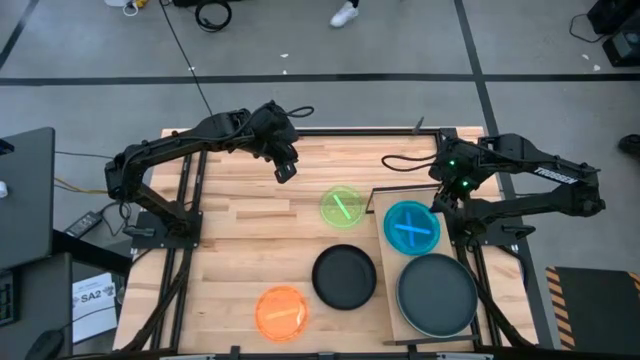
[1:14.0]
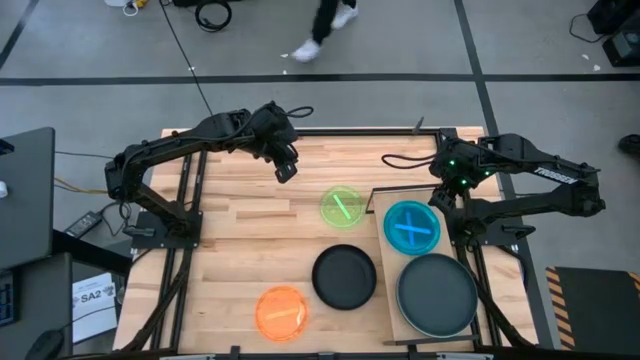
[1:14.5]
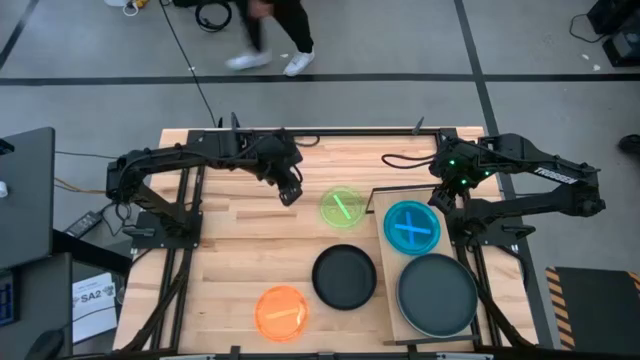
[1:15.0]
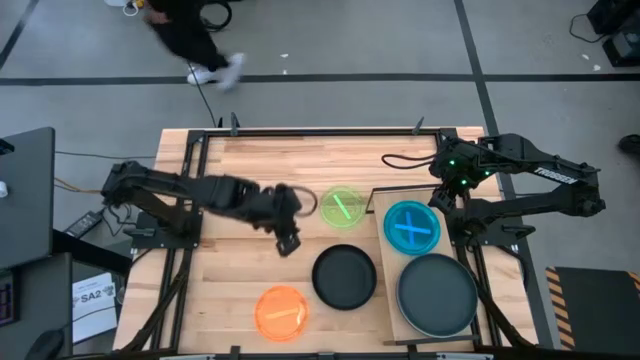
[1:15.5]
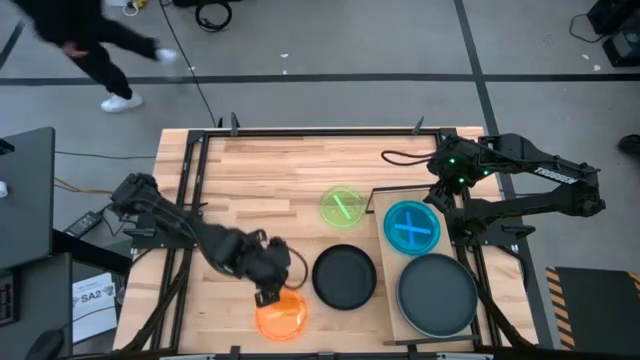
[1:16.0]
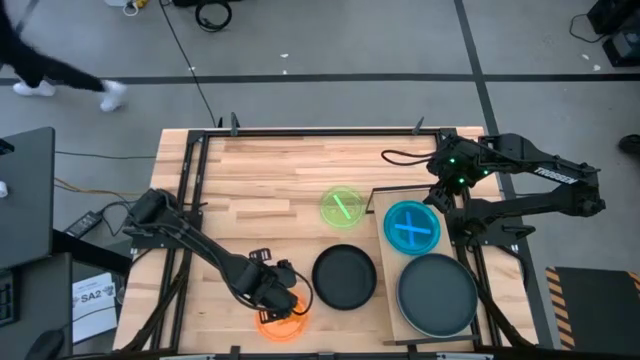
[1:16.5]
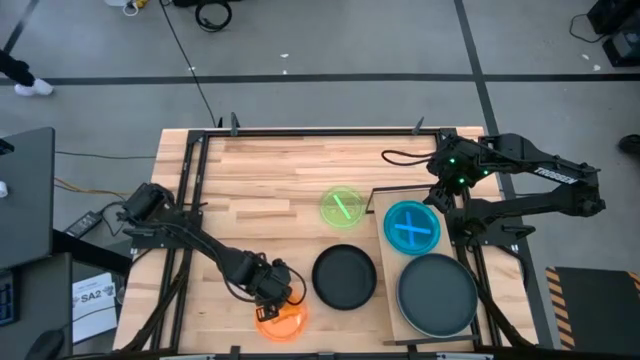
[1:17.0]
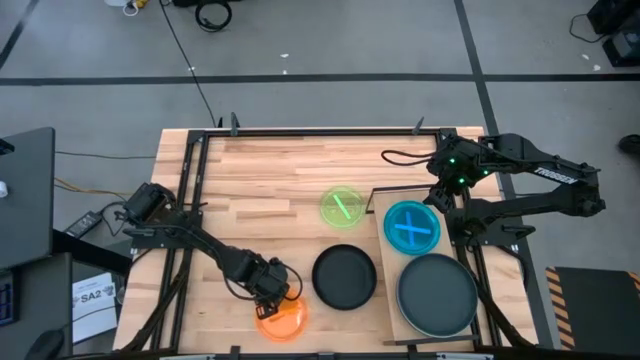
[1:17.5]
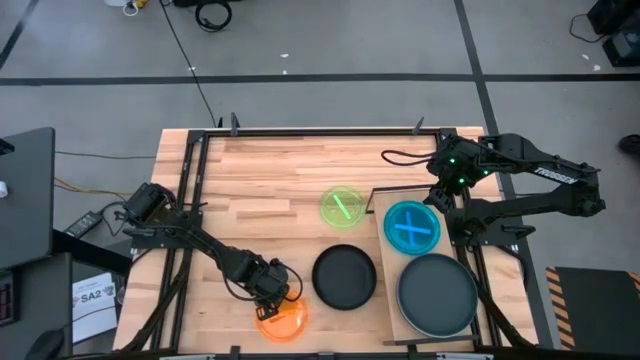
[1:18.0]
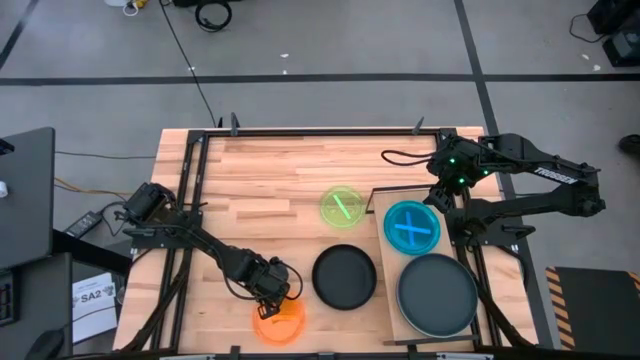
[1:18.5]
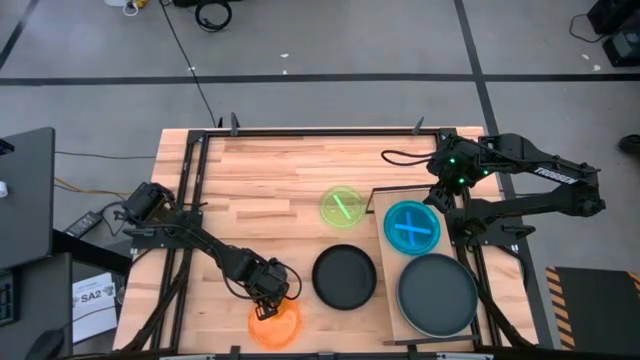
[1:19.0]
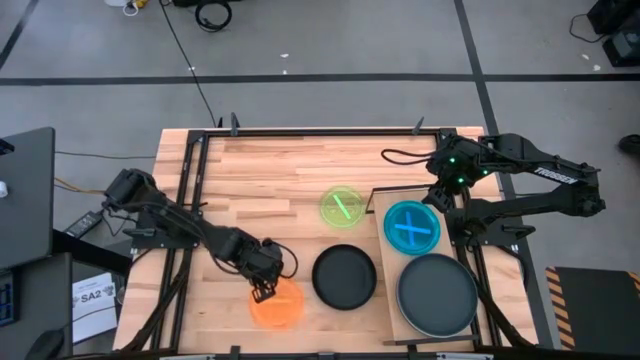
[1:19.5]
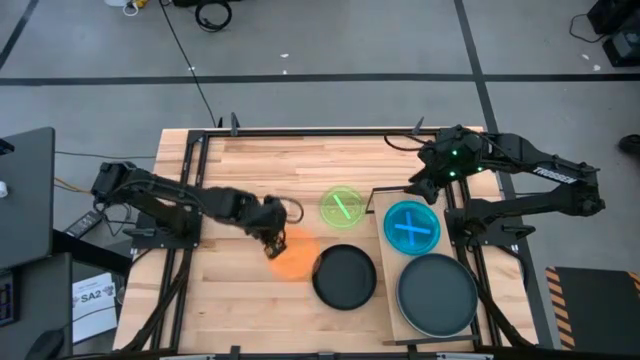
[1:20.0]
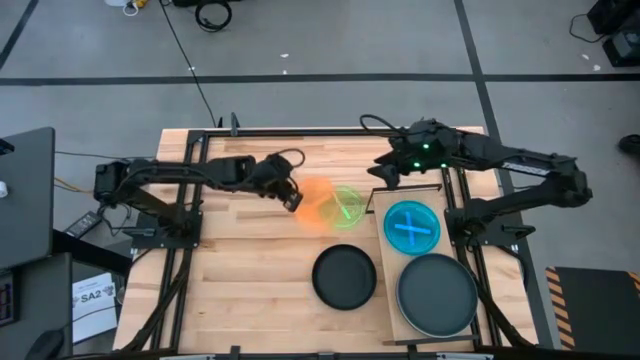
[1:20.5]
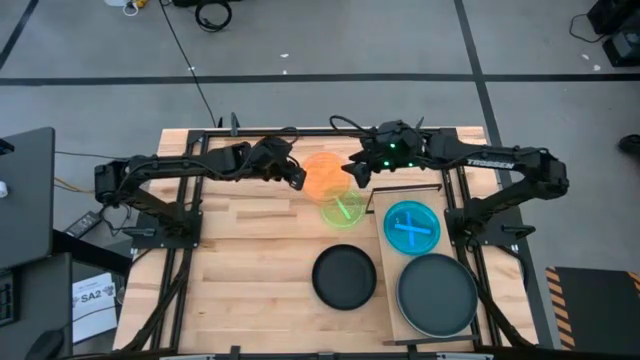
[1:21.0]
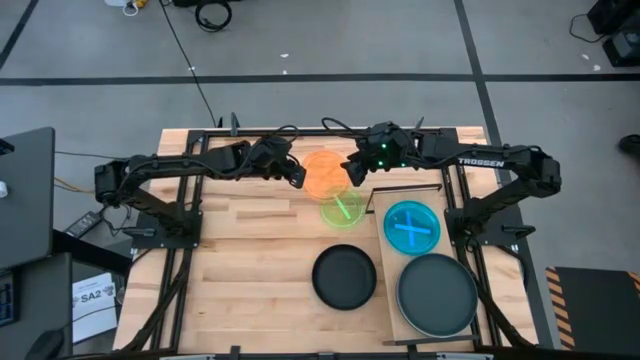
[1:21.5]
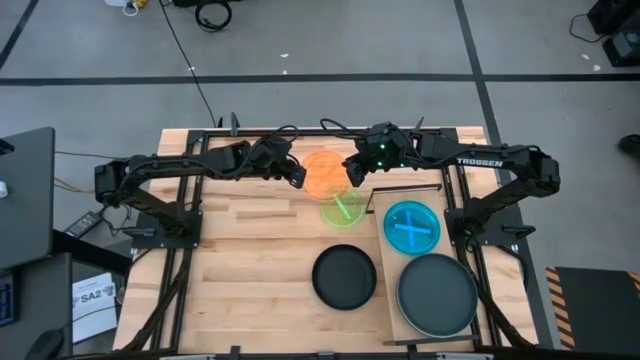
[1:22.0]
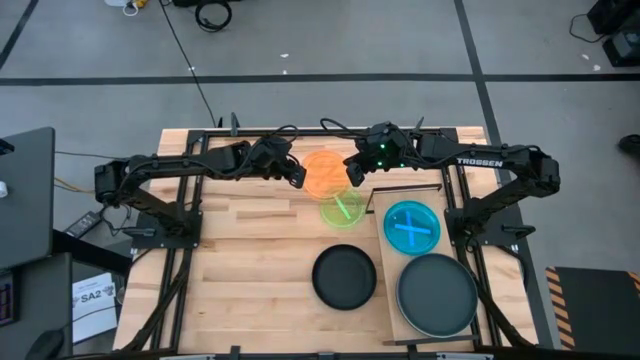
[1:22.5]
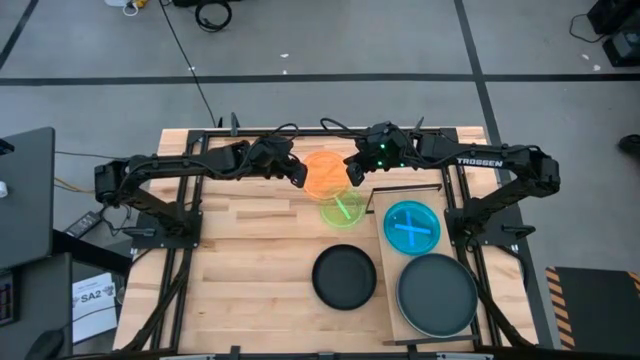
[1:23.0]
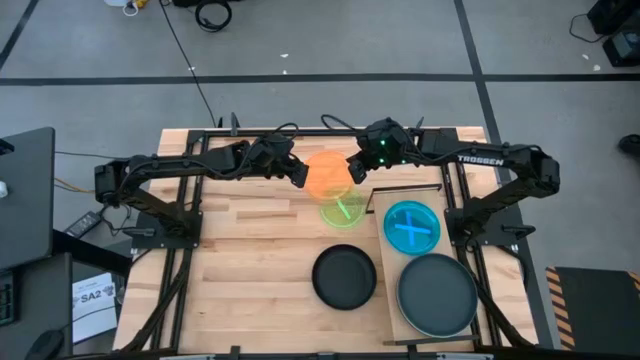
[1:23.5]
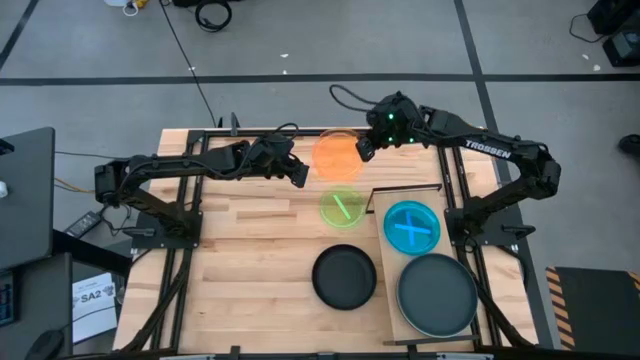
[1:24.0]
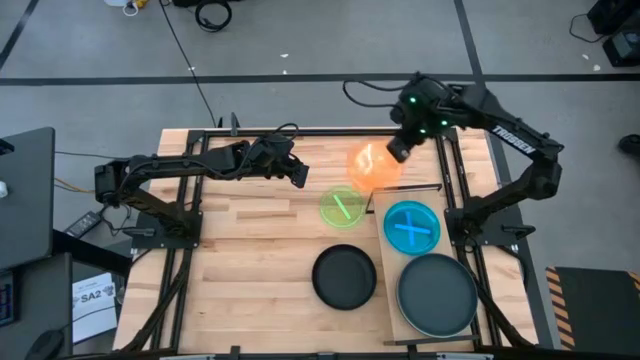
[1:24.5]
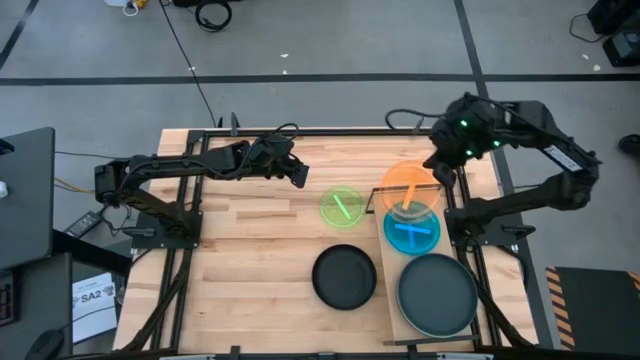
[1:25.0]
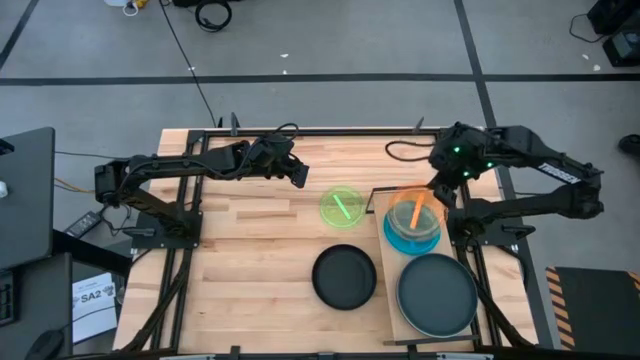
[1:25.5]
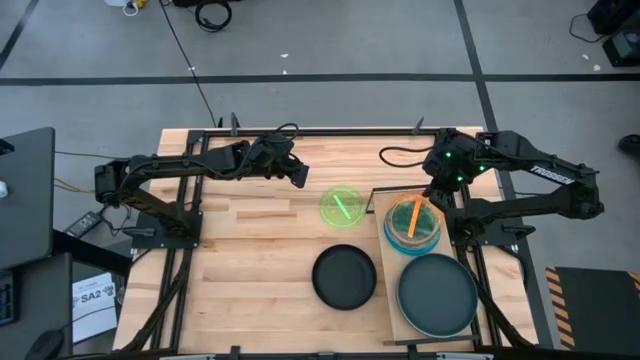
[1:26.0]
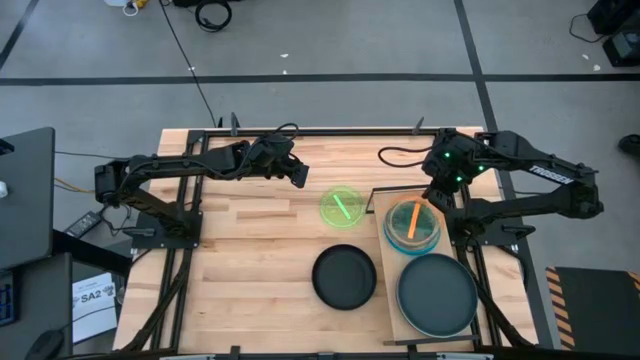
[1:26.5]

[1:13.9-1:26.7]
Task: Place and stack plates onto a shelf
Stack the orange plate on top of the blue plate on the shelf

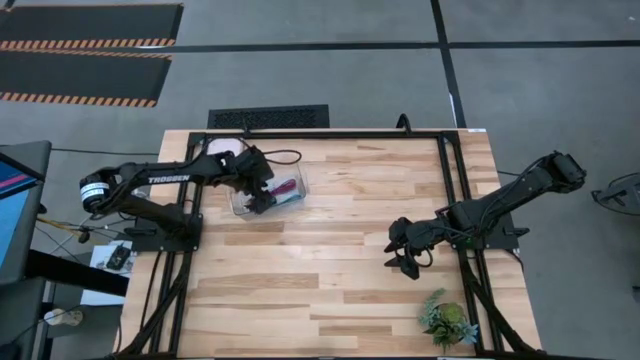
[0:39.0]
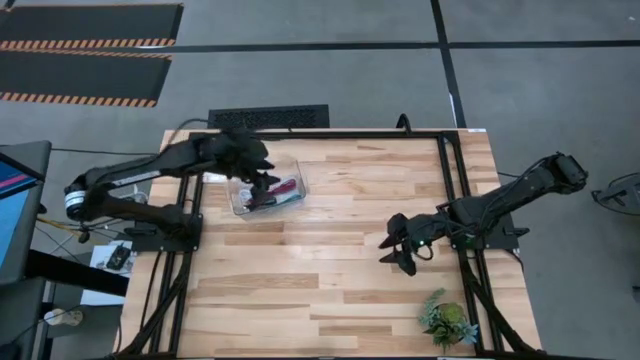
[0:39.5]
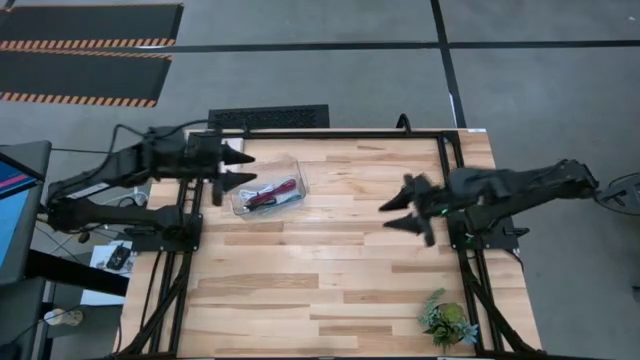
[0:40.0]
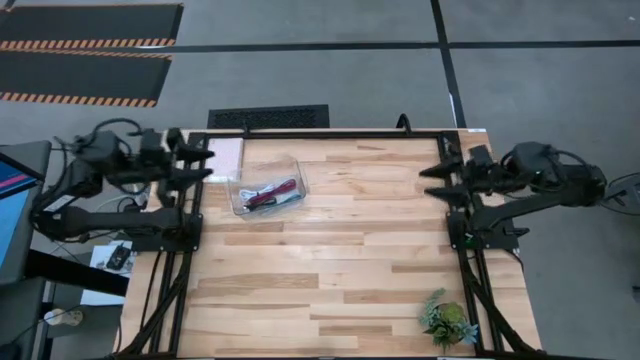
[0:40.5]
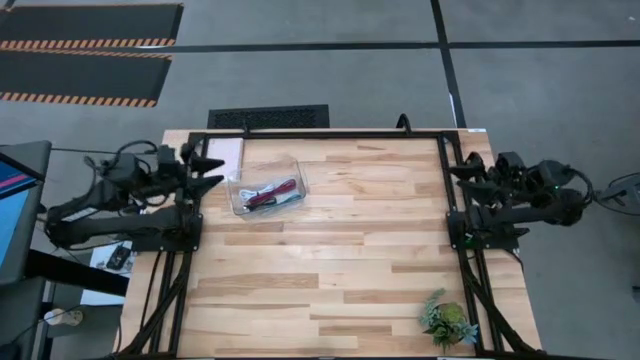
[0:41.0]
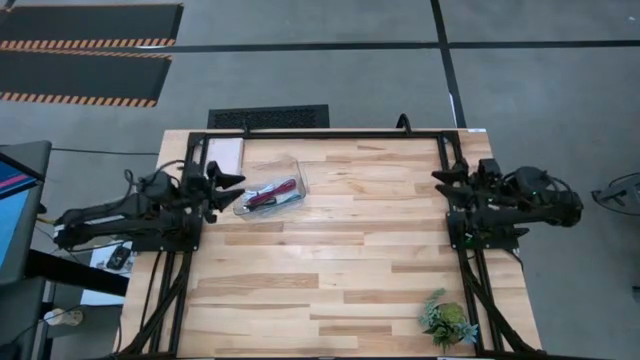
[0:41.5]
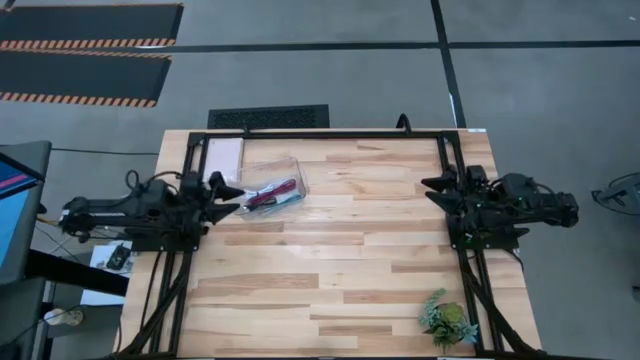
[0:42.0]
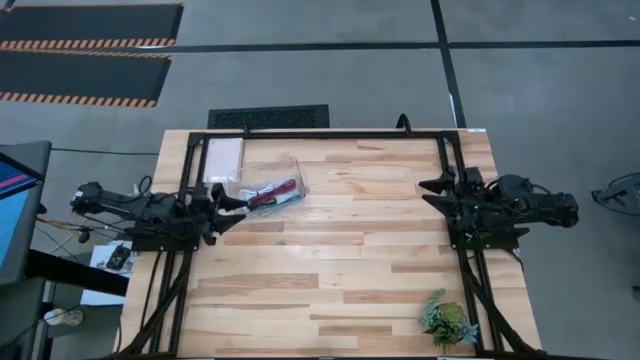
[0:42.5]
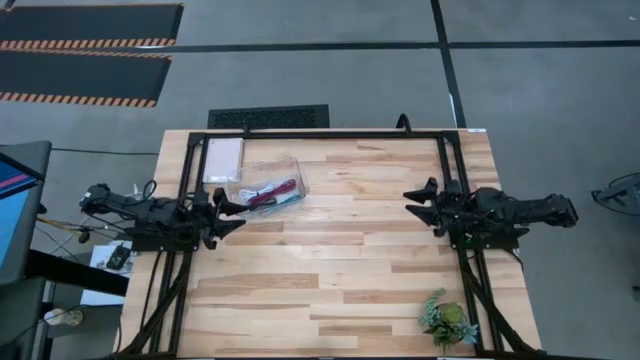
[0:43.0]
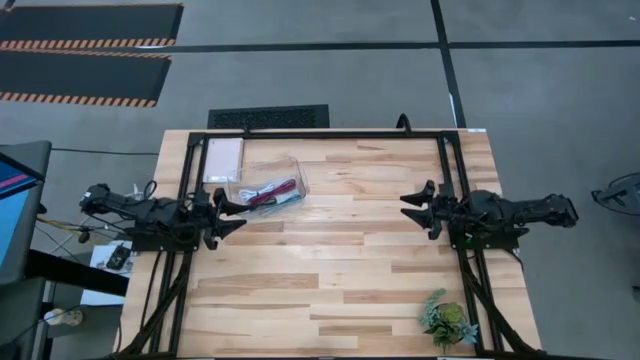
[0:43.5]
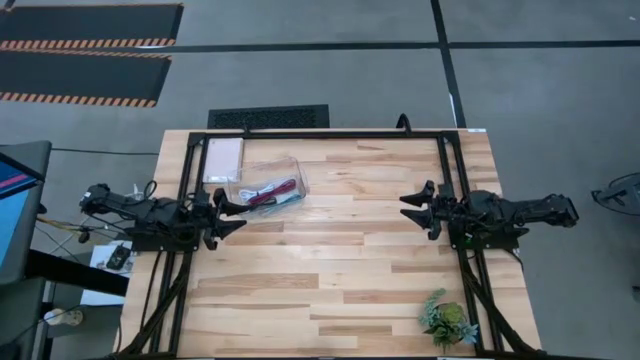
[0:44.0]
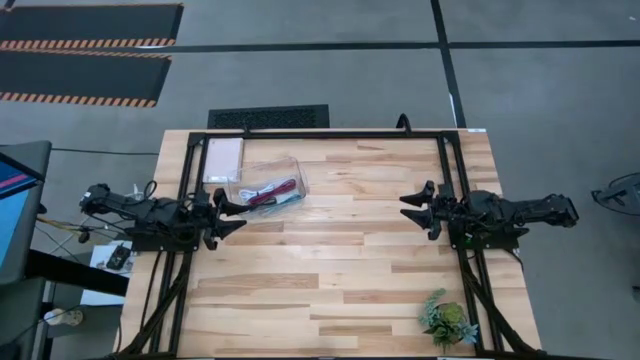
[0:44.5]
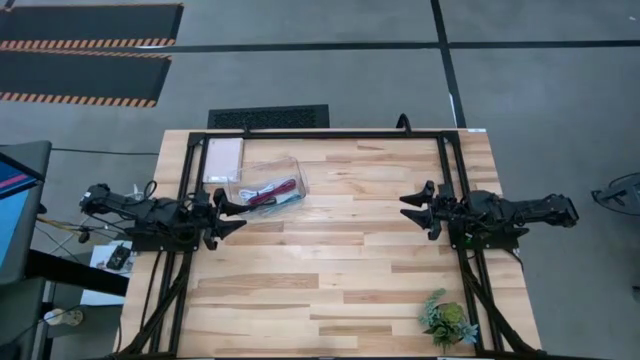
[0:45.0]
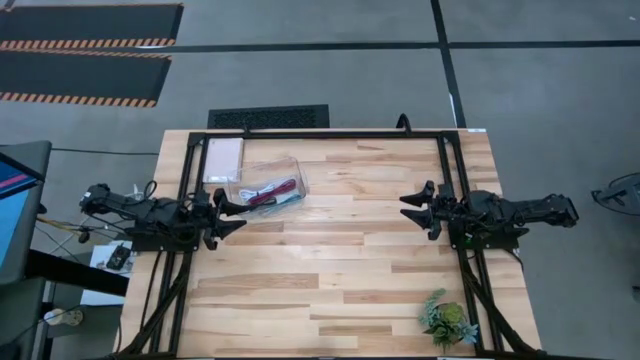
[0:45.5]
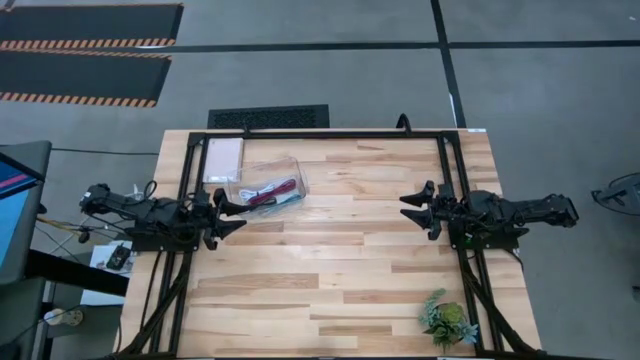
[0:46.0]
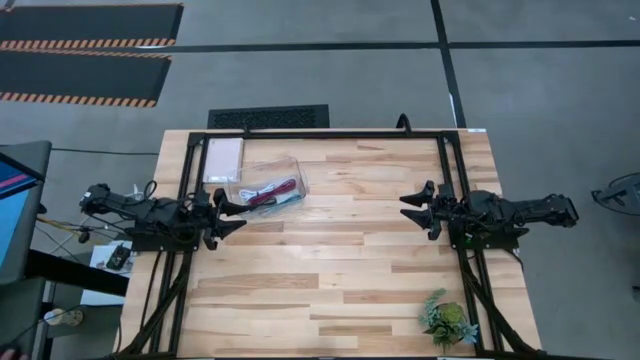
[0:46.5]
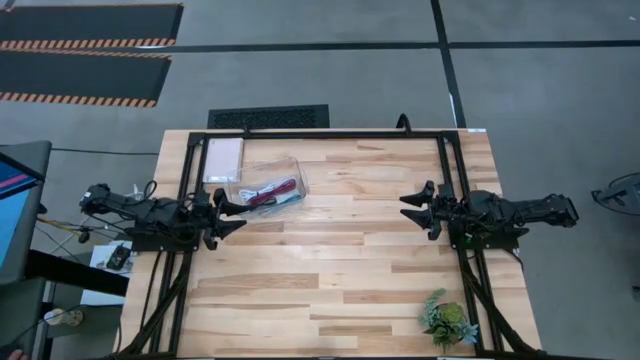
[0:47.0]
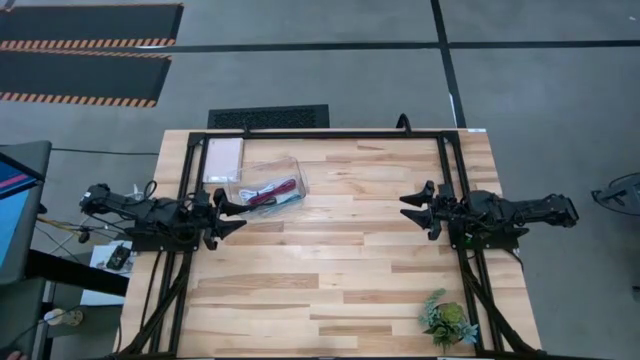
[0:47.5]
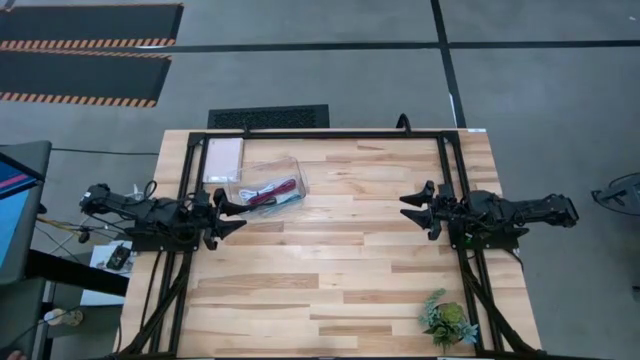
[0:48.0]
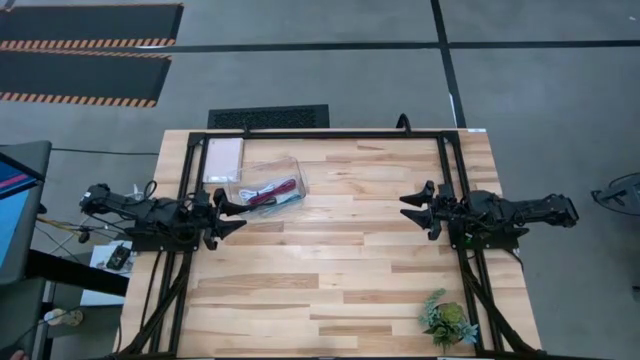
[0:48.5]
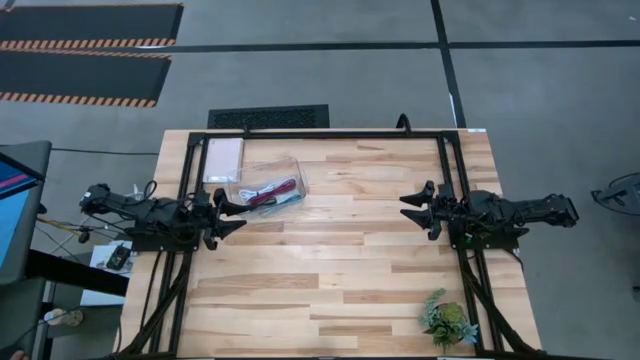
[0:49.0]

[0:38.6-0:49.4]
Task: Pick and place USB-C Cables
Return to Home Position
